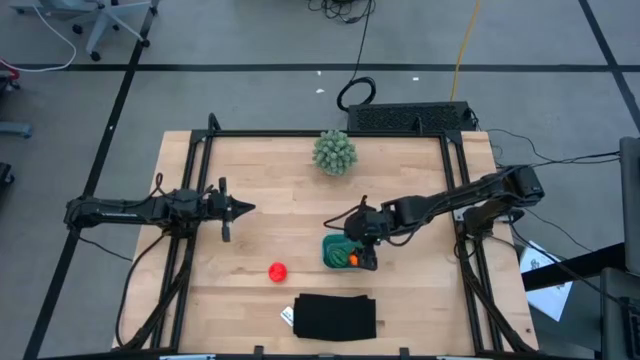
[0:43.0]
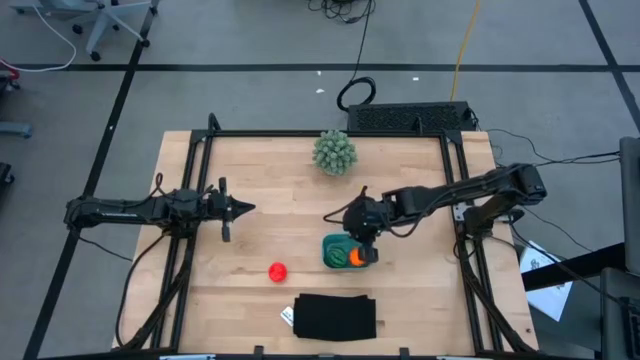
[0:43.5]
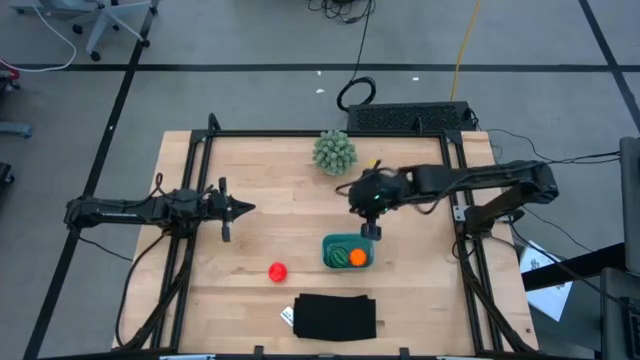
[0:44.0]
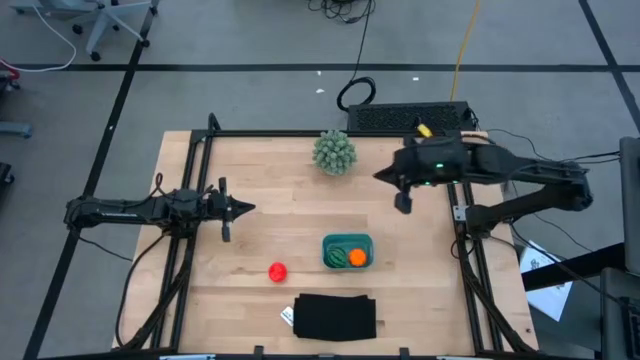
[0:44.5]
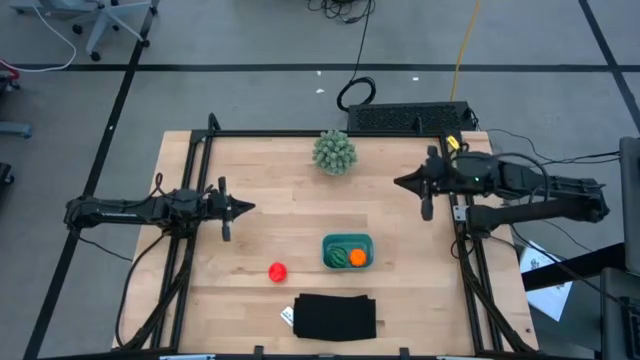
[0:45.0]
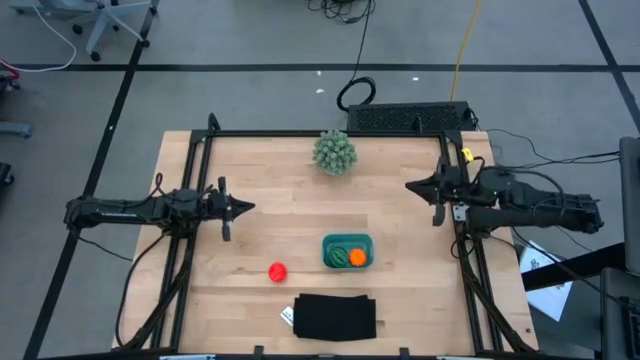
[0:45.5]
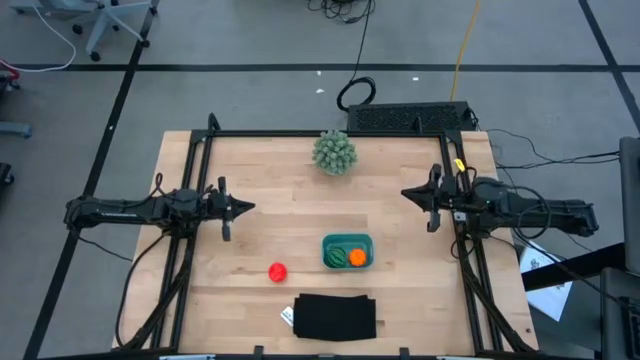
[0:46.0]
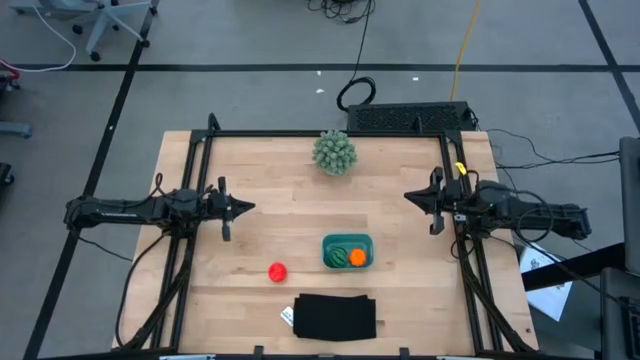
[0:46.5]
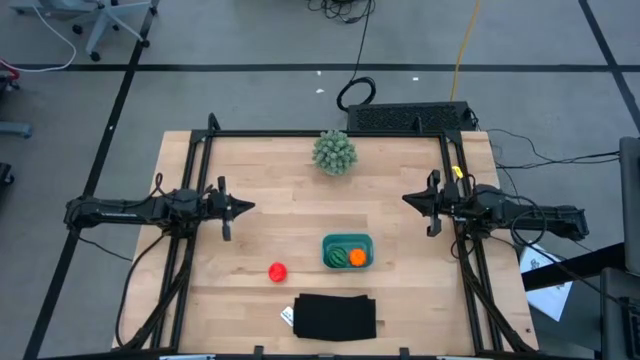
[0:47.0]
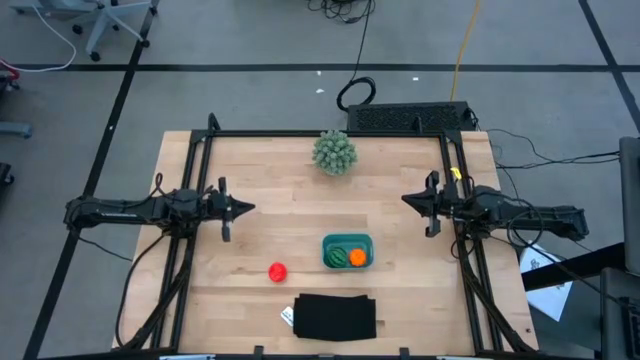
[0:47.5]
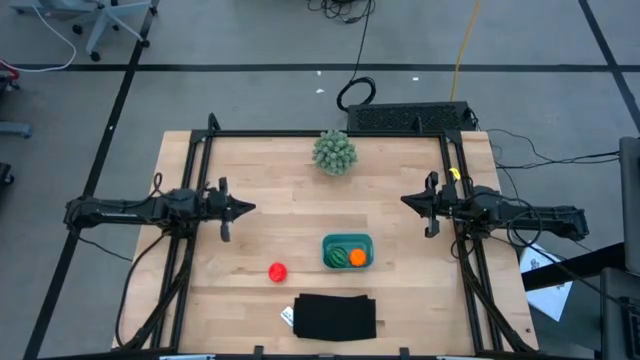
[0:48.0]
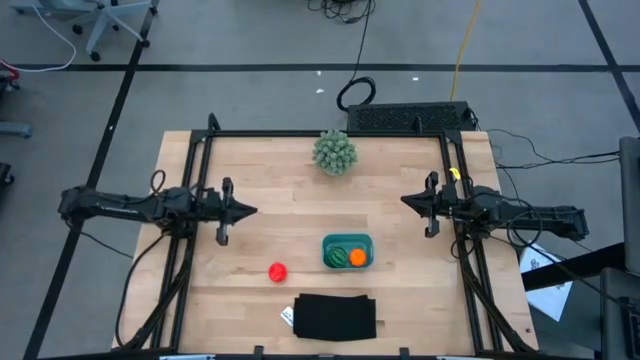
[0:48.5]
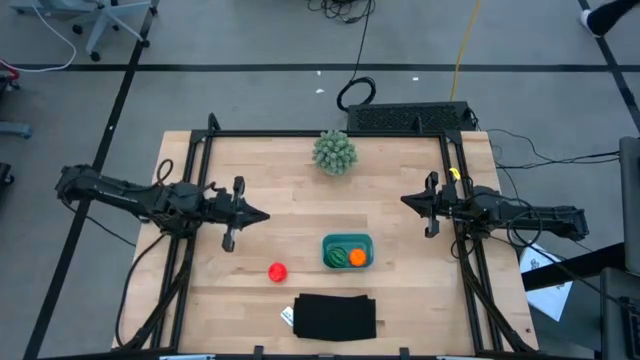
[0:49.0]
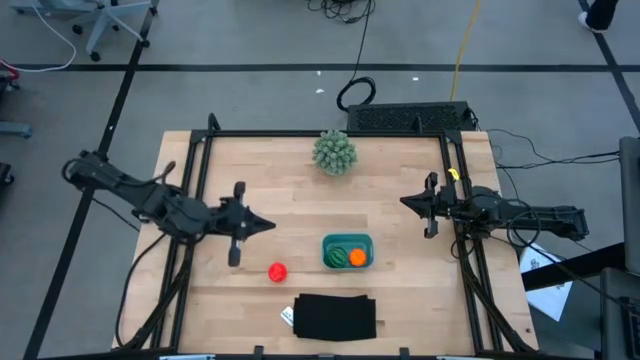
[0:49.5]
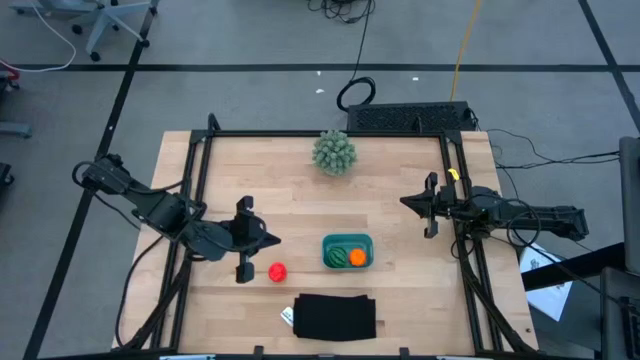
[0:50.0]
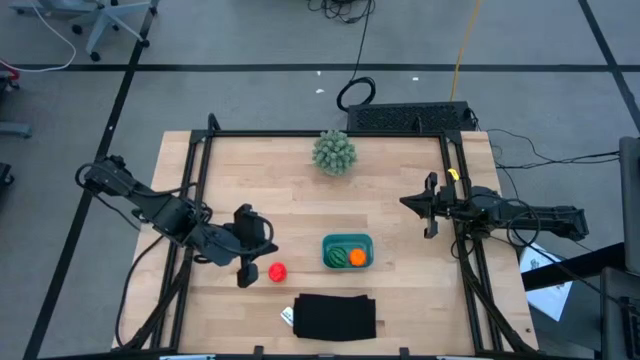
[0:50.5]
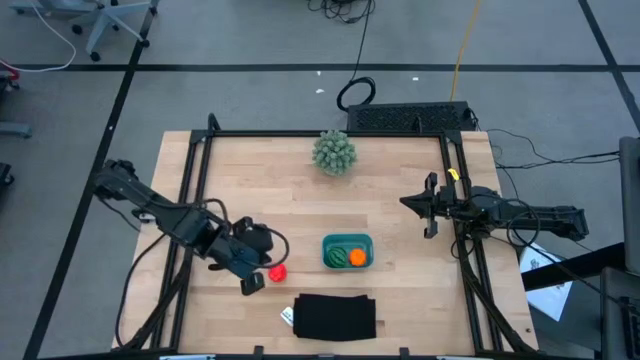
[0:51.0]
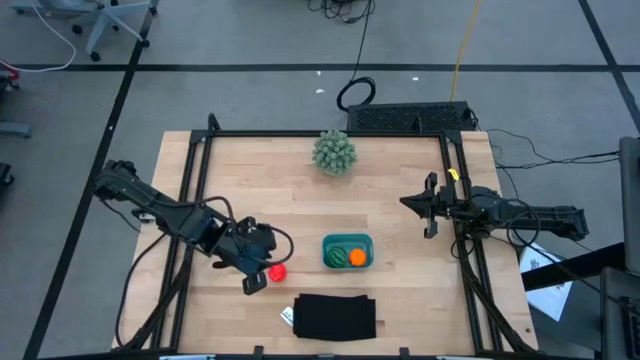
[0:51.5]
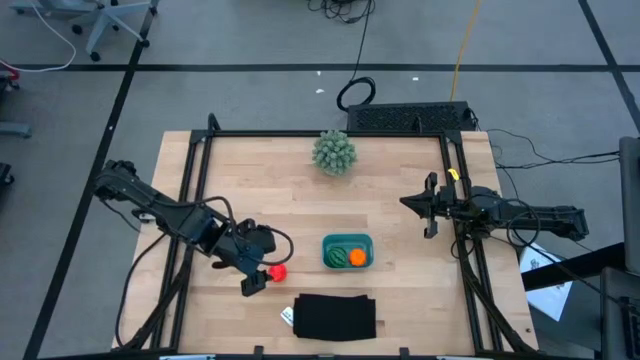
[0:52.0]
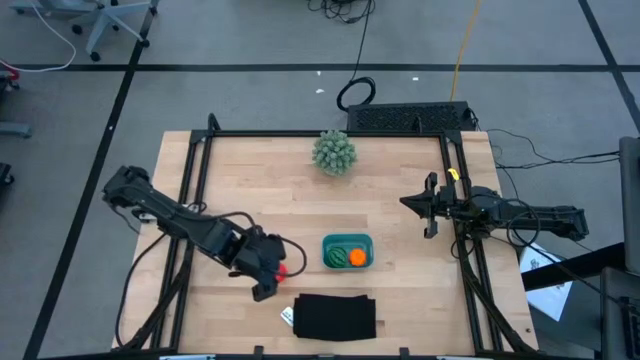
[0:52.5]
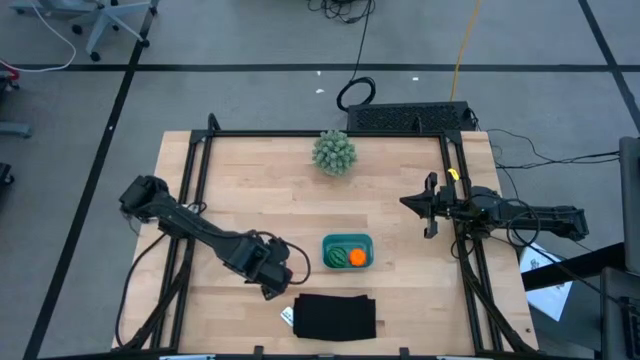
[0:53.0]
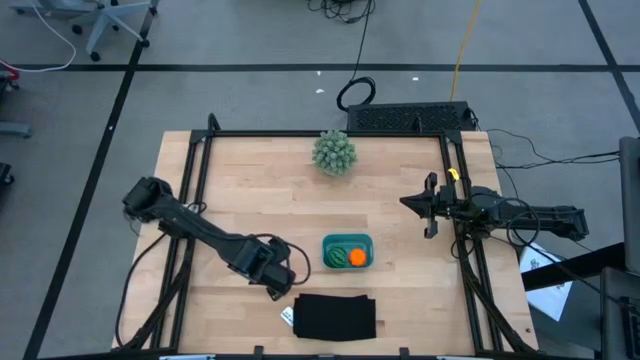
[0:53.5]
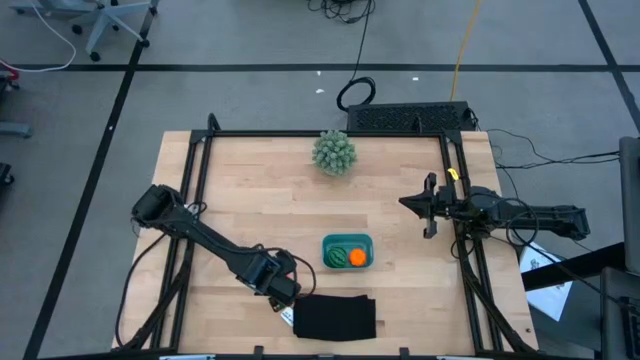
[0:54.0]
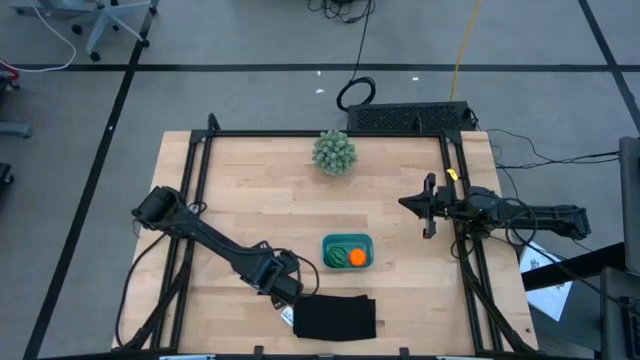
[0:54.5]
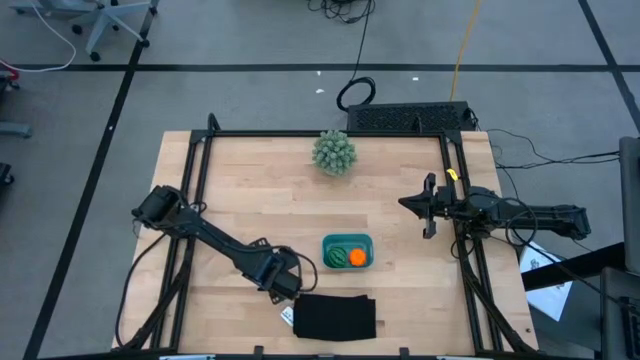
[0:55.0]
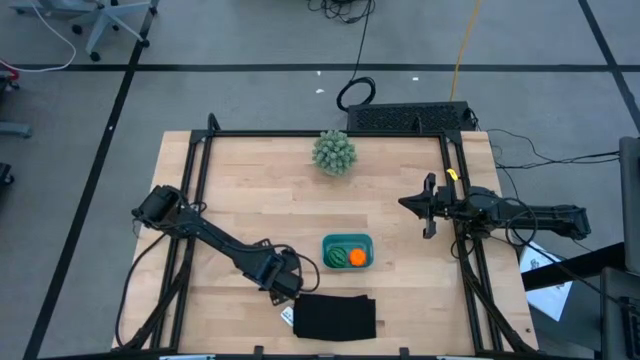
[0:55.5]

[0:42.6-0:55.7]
Task: Pick and placing Produce into tupperware
Put the apple into the blue bin

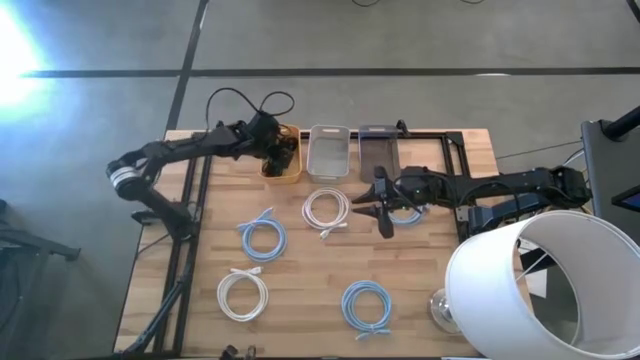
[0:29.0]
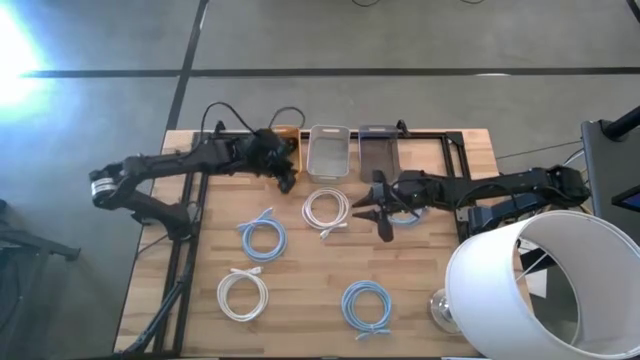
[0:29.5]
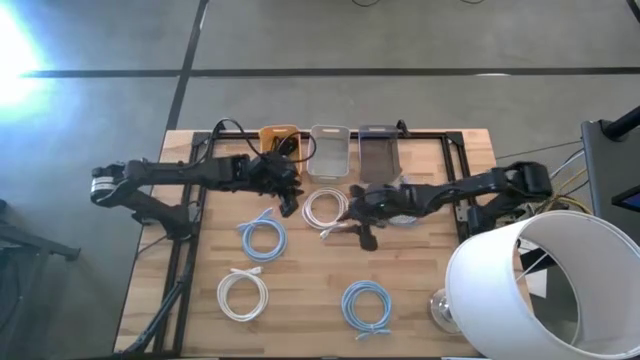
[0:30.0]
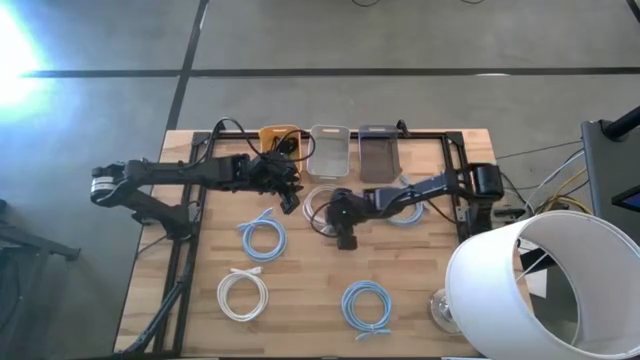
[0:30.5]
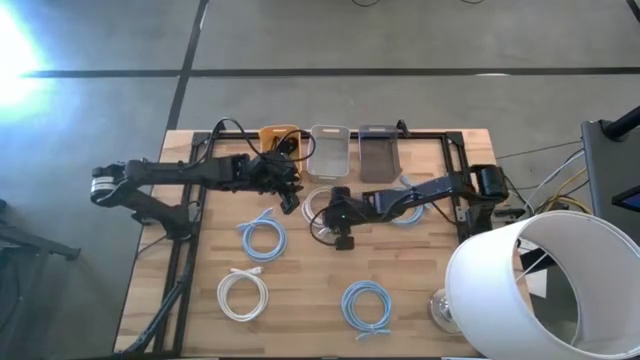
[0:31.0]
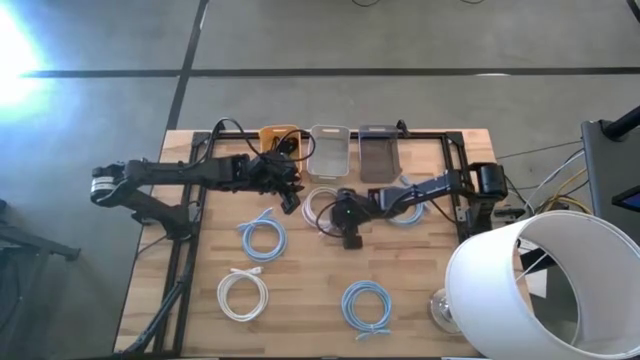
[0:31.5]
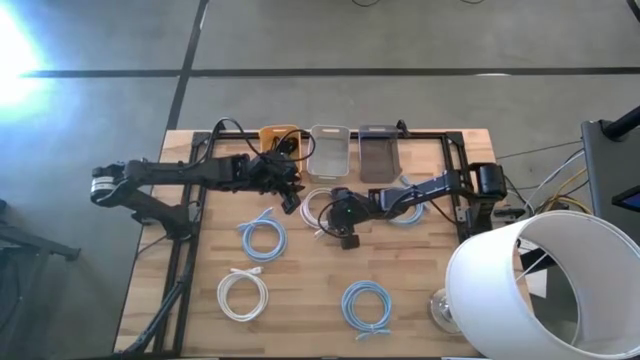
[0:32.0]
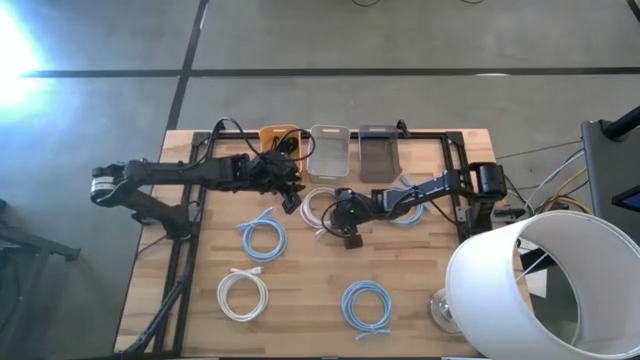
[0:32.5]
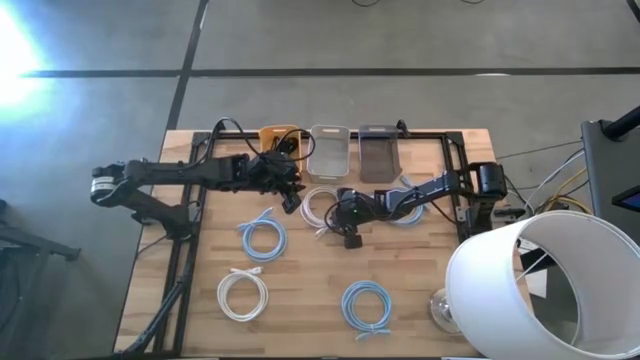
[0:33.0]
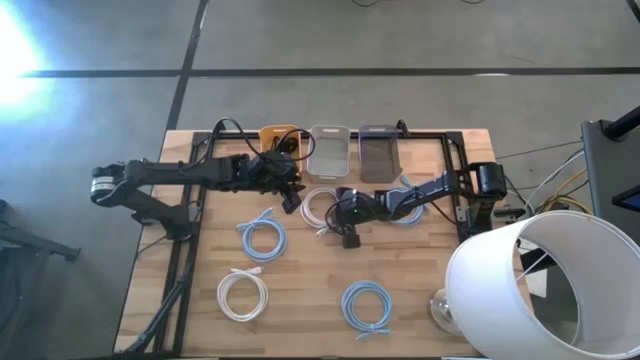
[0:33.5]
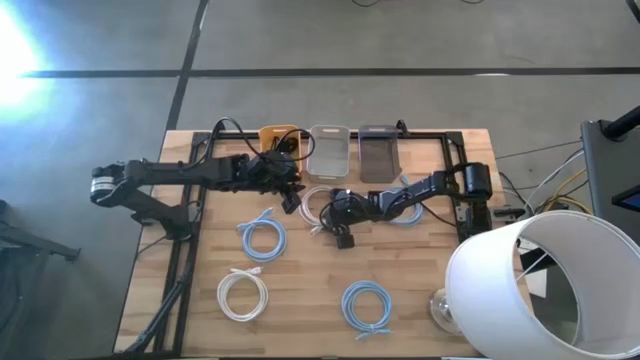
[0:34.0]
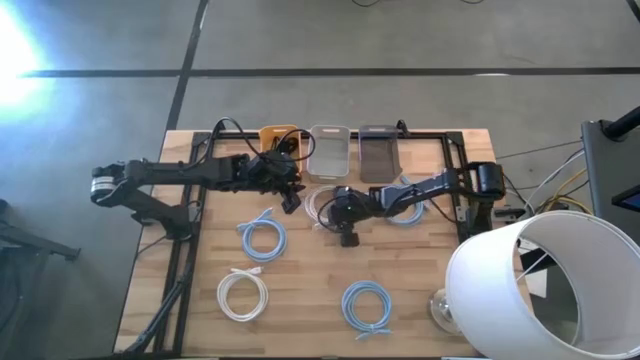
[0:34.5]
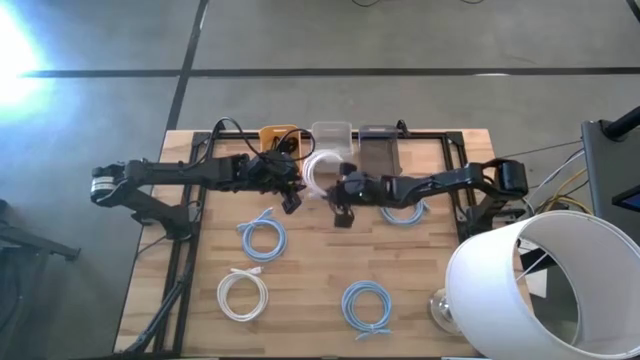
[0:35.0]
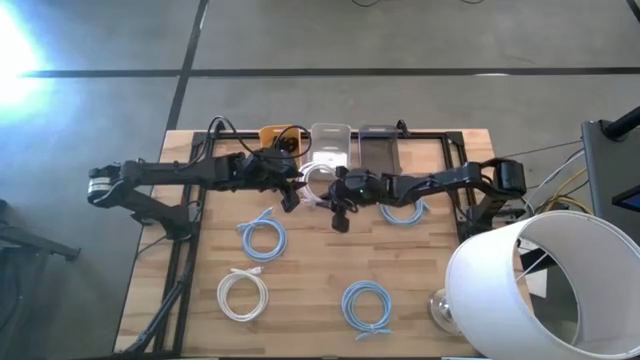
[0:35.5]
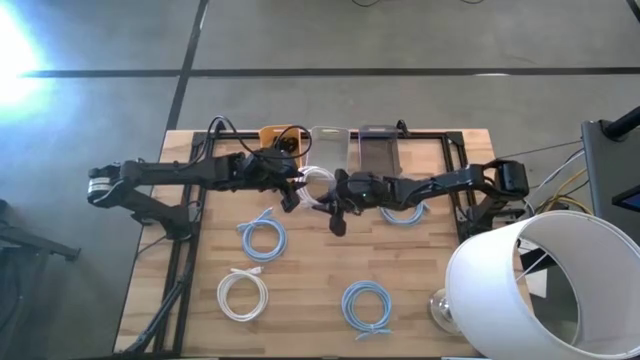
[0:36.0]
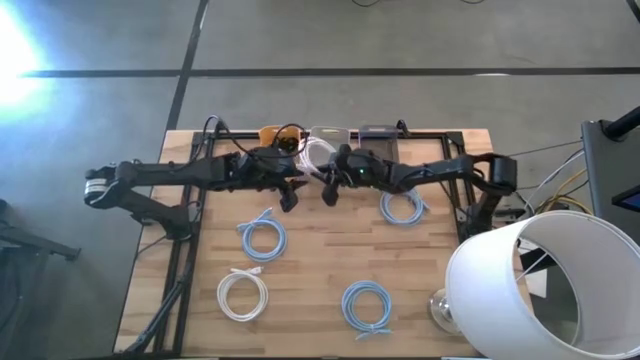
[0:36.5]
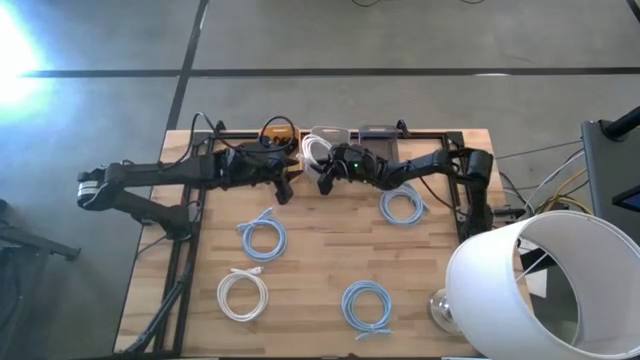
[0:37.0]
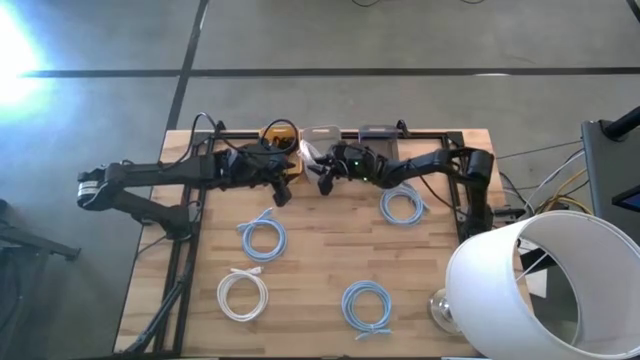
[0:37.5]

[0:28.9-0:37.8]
Task: Pick & Place USB Port
Put the top white display cable into the gray bin
